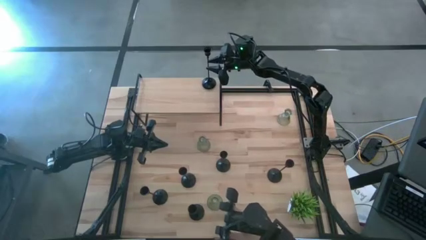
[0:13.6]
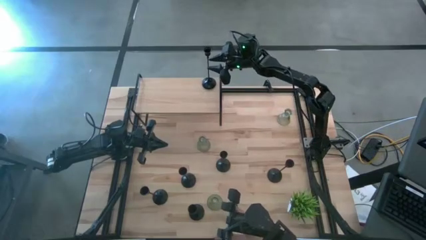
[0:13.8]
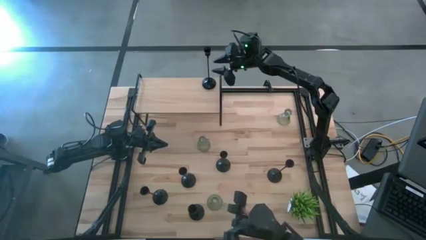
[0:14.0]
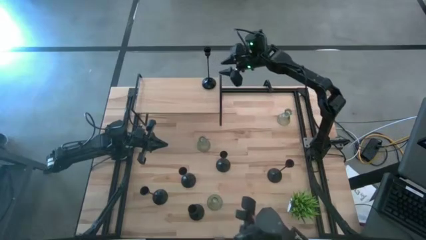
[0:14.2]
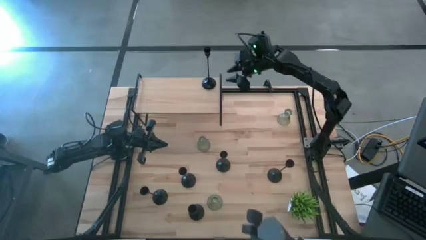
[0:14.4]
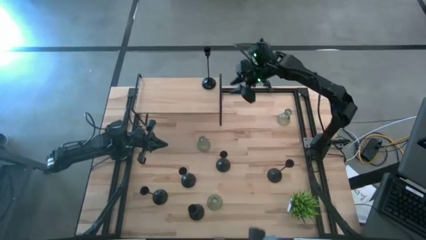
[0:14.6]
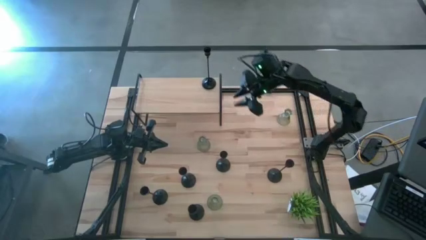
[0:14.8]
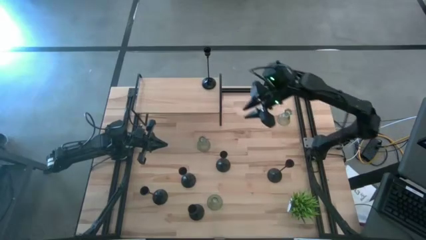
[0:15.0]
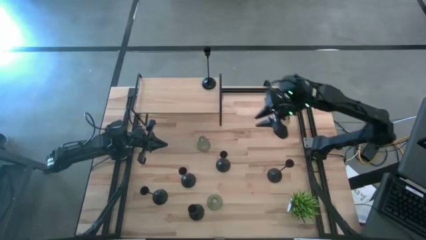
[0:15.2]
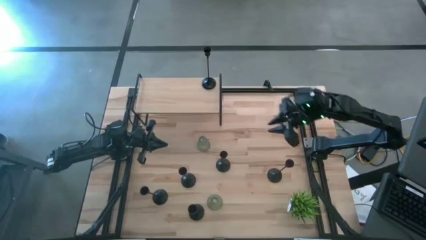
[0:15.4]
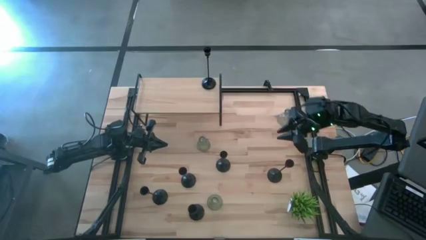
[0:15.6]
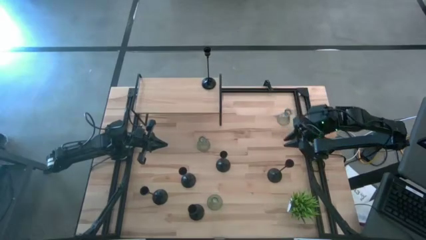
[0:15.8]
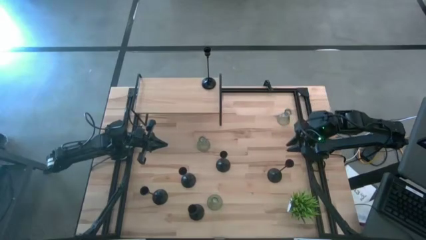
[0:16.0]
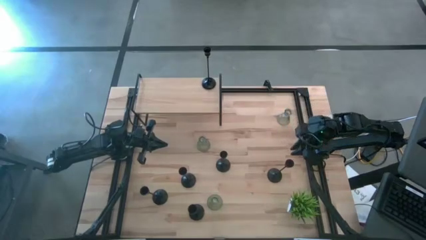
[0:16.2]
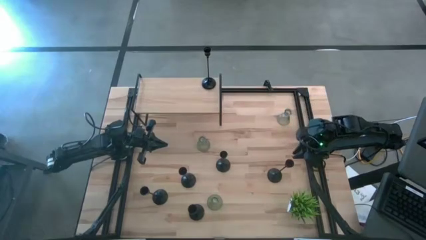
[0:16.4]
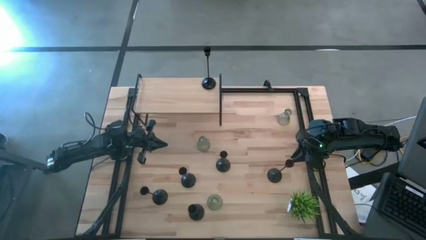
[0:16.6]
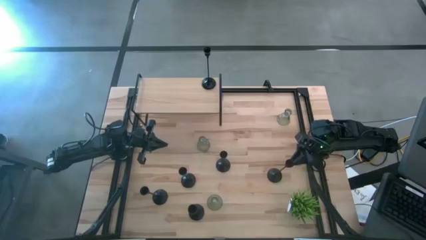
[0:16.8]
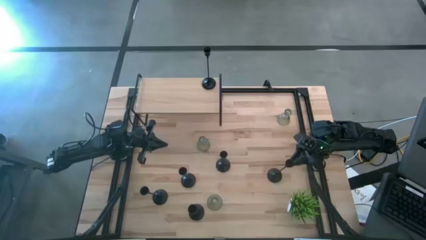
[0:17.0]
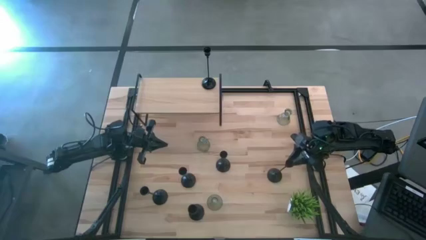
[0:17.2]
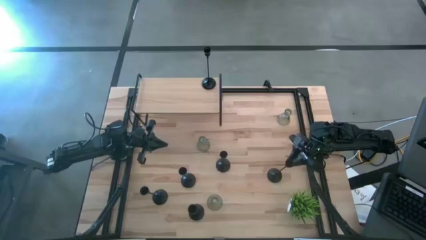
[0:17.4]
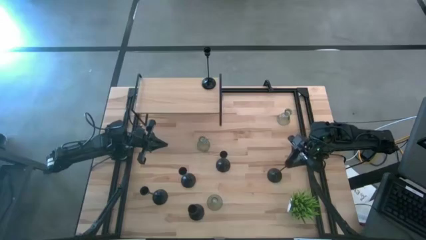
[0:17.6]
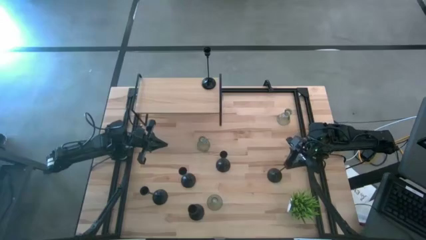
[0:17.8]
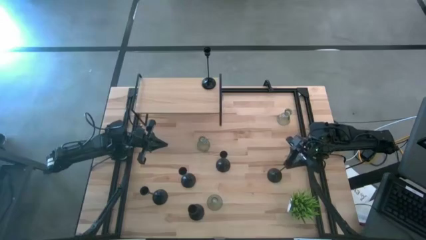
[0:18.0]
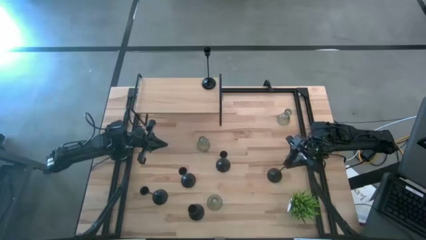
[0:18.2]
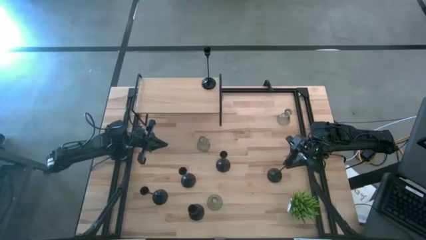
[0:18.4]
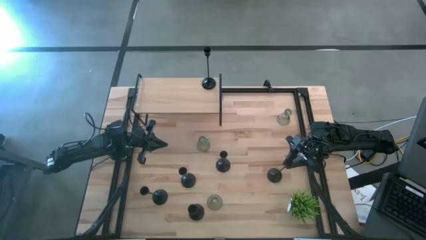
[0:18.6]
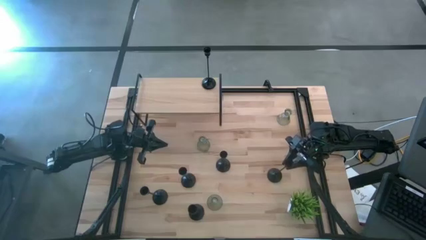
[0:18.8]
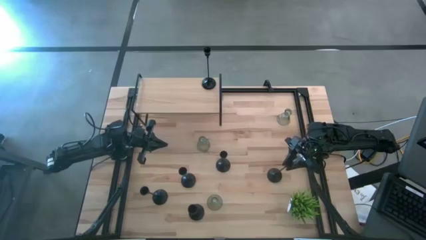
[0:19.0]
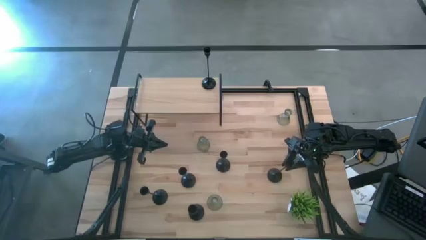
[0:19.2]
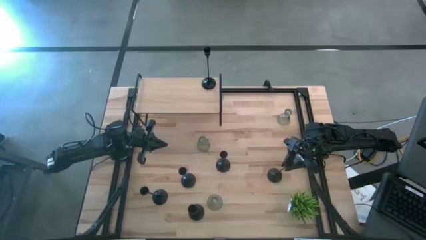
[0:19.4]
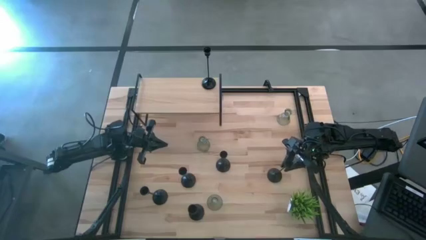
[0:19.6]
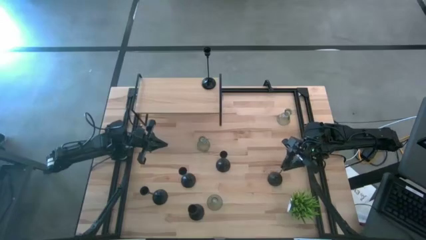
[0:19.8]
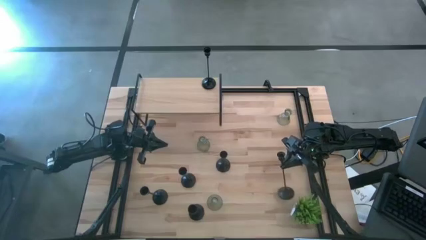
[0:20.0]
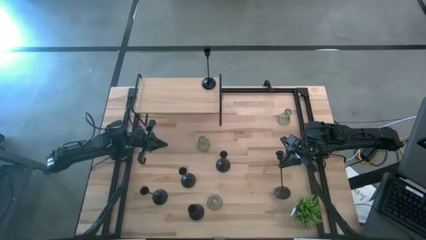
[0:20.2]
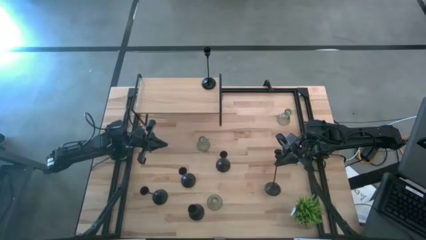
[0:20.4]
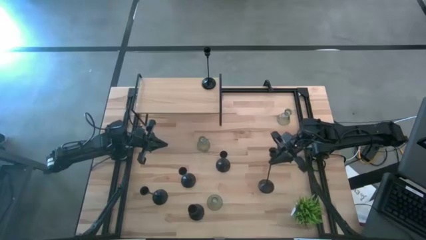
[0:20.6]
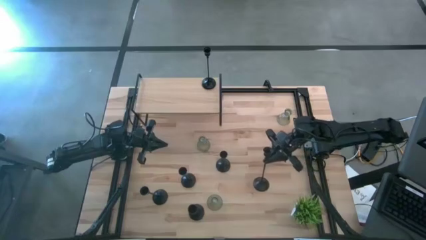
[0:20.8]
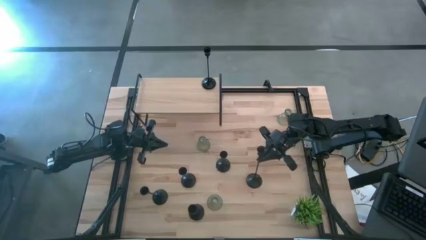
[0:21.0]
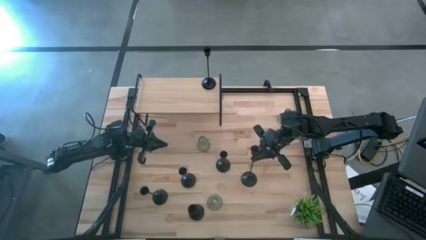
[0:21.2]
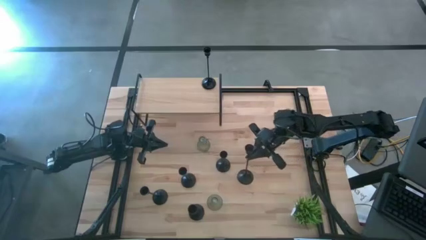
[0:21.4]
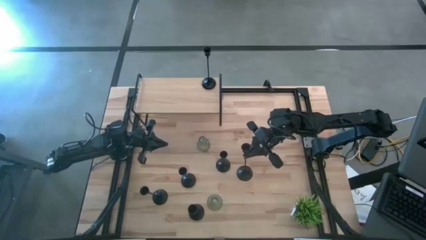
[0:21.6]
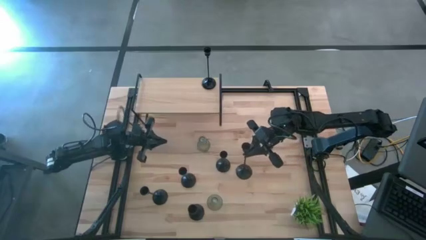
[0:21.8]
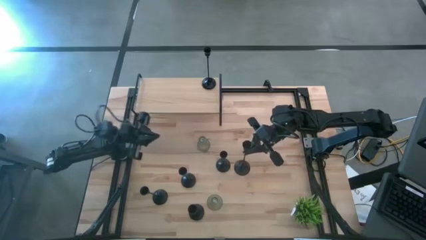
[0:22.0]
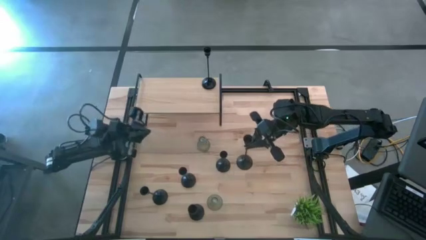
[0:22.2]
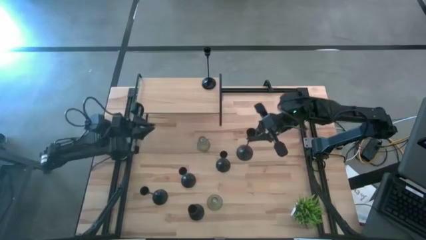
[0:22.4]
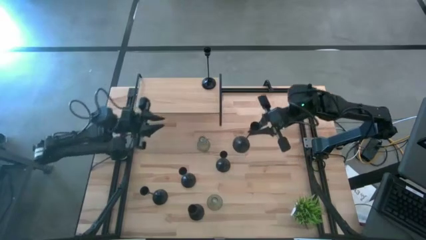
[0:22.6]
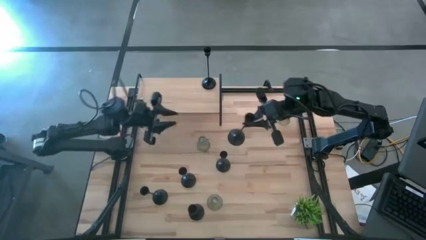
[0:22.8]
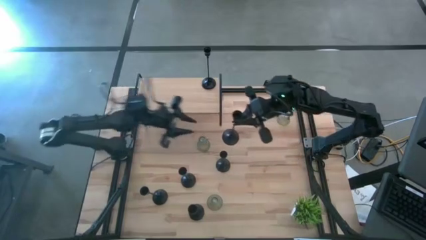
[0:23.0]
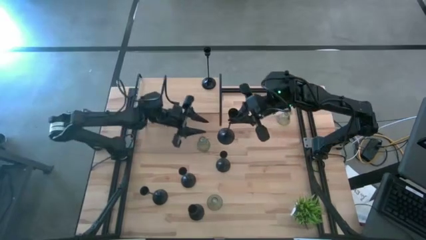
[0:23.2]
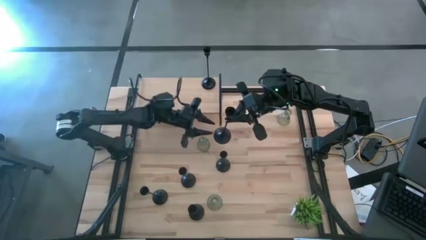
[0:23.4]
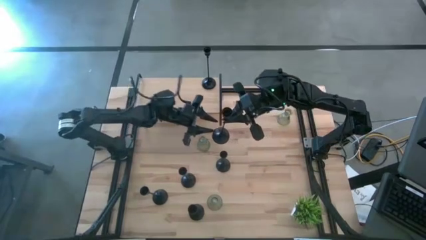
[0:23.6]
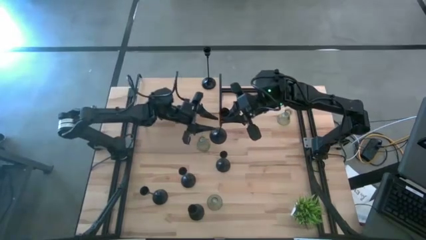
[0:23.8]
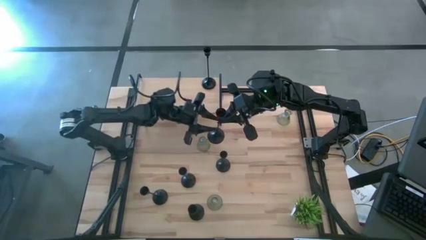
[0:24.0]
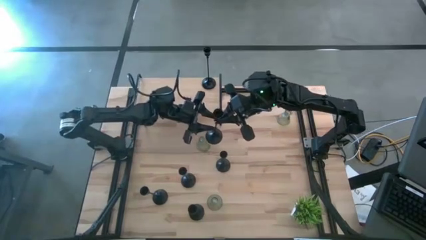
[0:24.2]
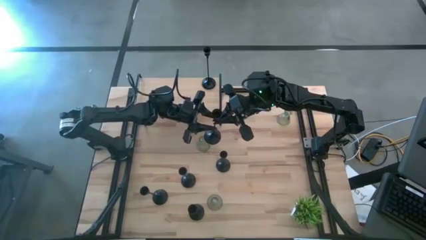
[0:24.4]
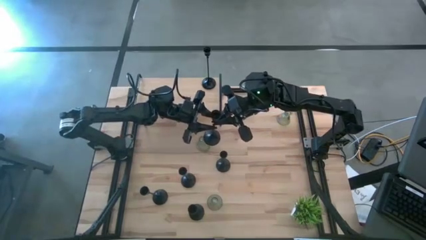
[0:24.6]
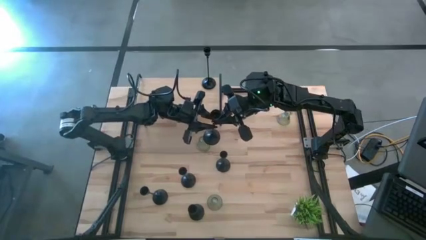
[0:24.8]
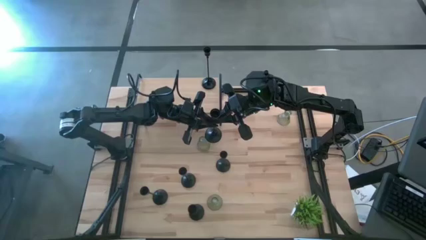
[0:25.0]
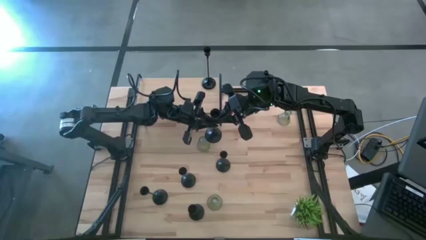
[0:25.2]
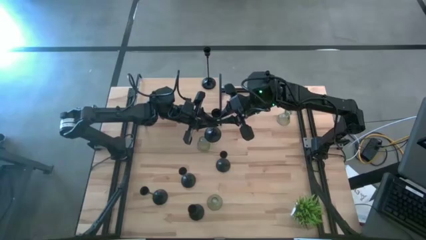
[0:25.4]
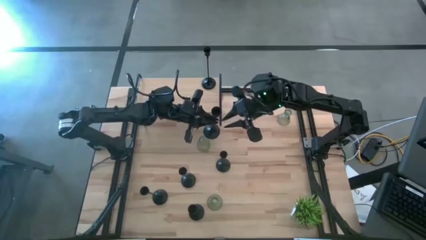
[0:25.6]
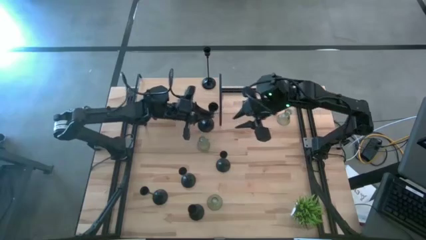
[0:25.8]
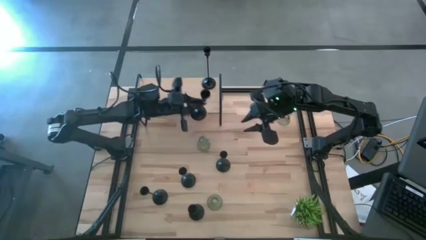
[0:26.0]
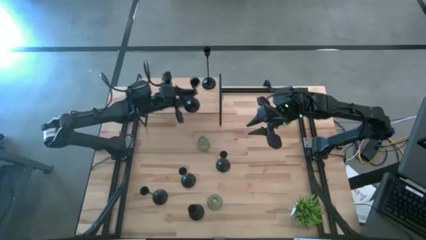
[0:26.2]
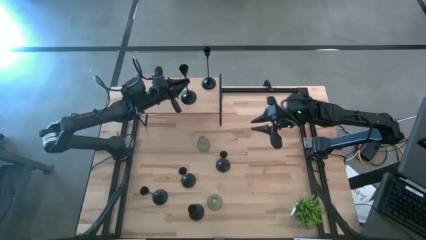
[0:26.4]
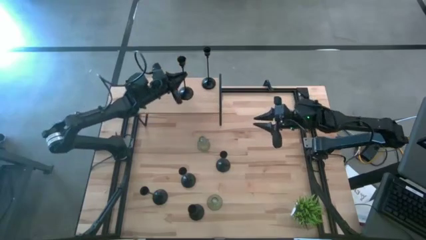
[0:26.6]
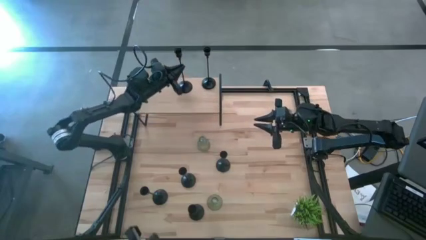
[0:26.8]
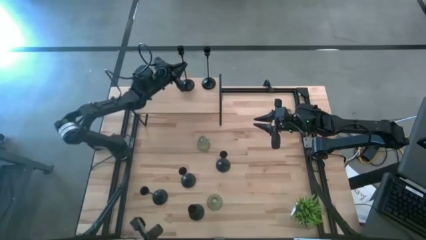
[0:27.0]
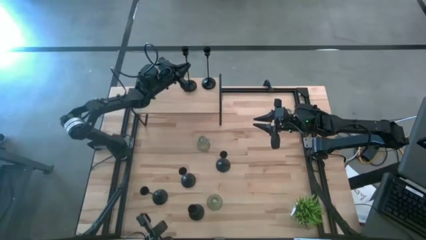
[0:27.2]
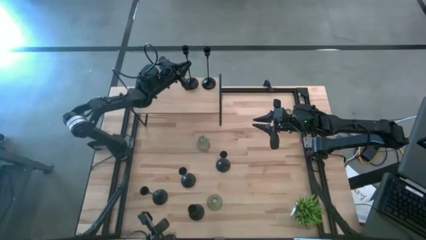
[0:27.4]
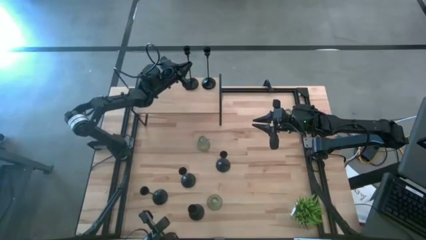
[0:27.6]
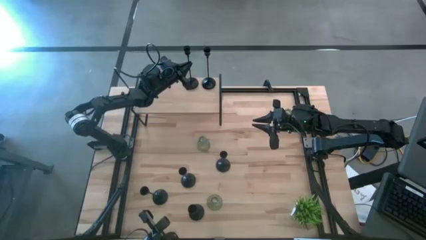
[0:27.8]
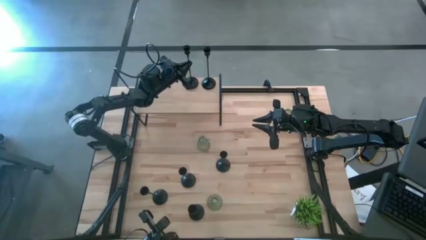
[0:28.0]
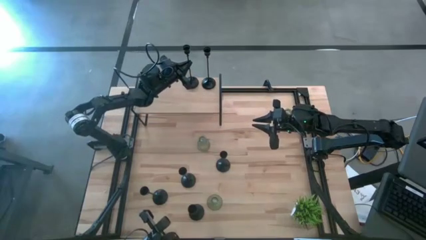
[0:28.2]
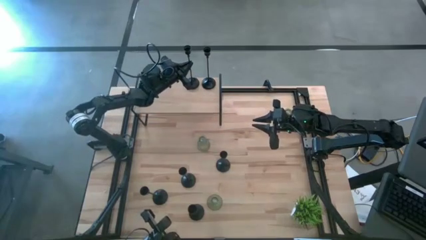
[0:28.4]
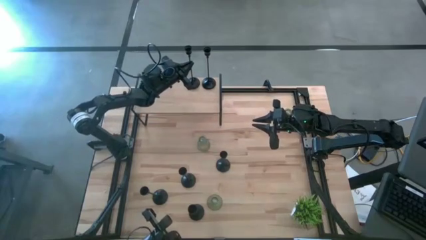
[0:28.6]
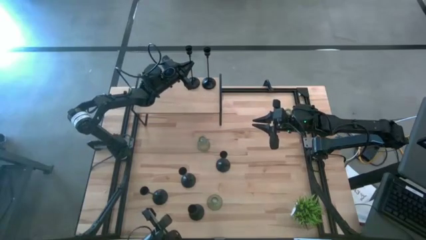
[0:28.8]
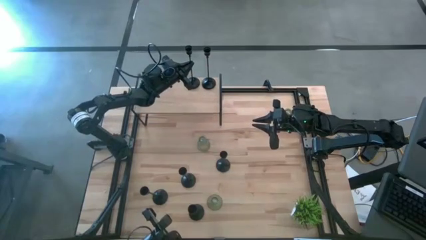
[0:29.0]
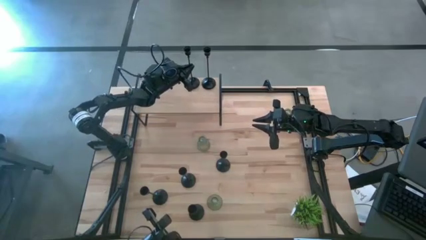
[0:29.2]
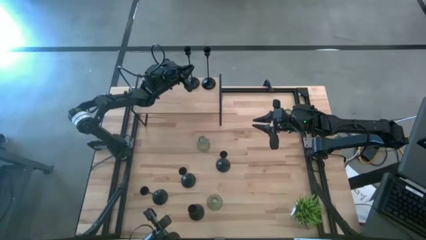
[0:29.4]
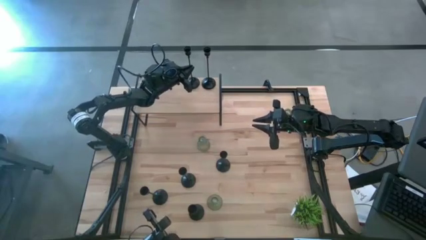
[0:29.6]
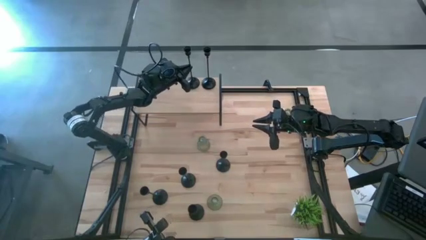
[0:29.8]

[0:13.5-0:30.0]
Task: Pick & Place candle stick holders
Put the black candleholder on the shelf
